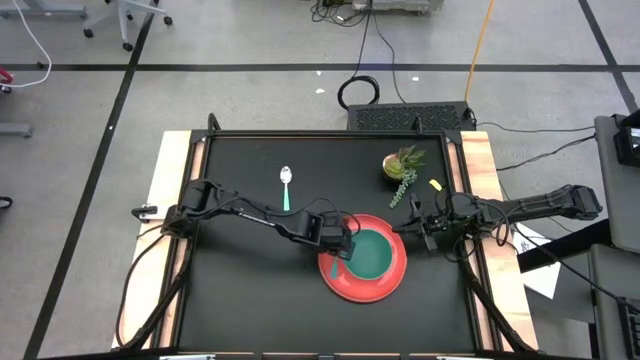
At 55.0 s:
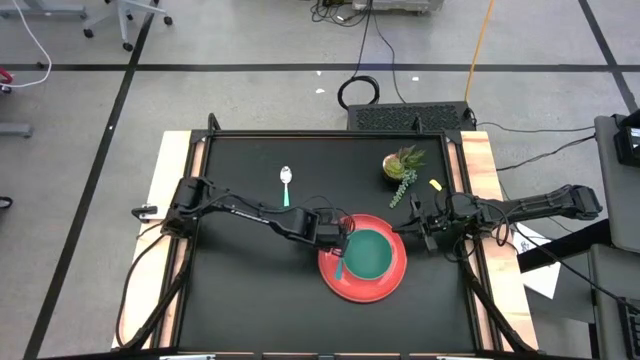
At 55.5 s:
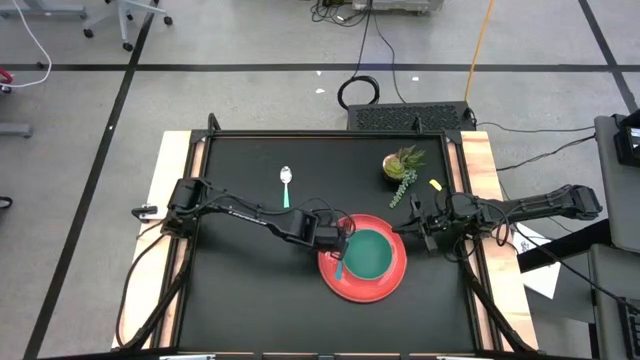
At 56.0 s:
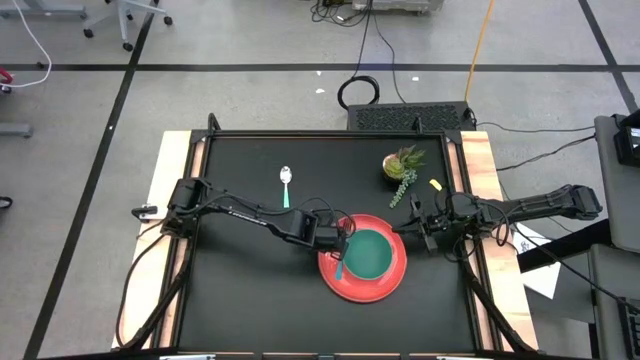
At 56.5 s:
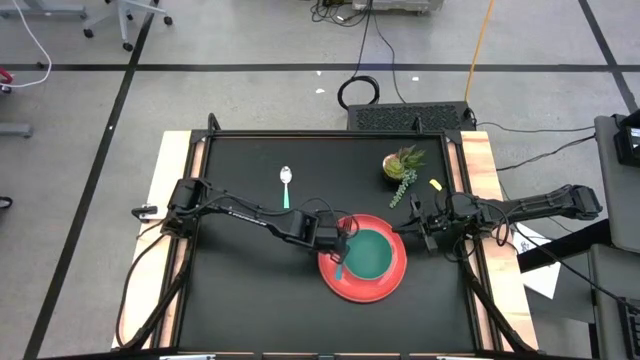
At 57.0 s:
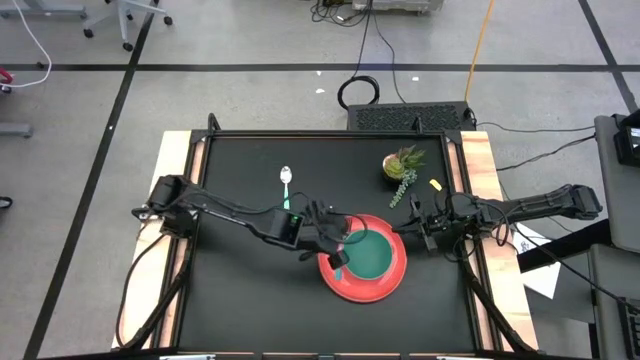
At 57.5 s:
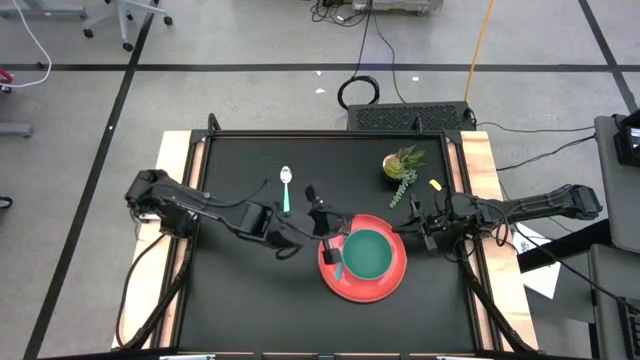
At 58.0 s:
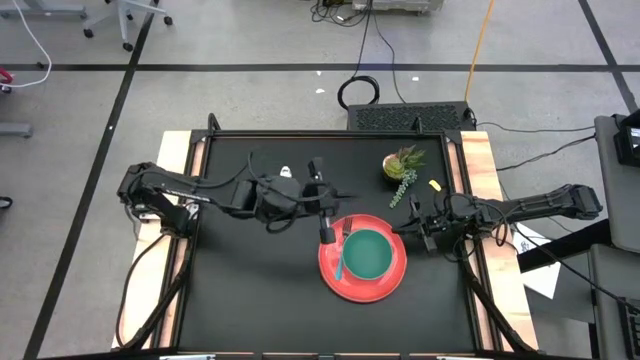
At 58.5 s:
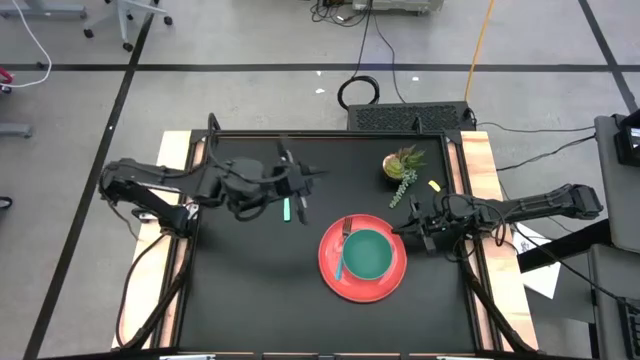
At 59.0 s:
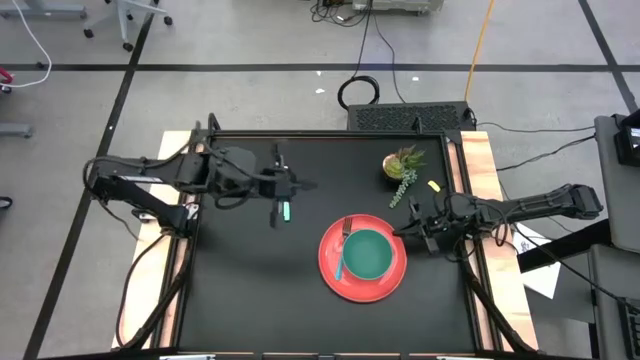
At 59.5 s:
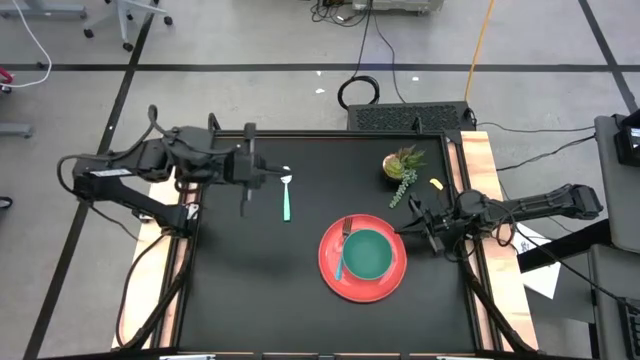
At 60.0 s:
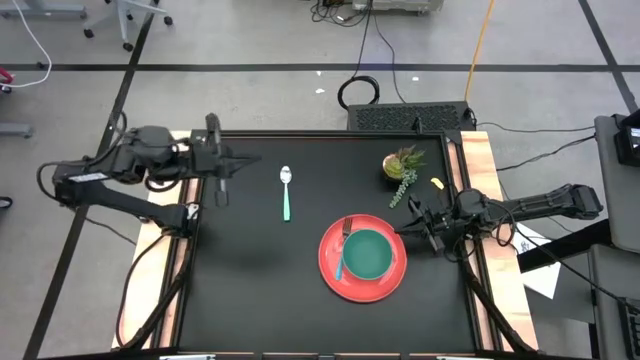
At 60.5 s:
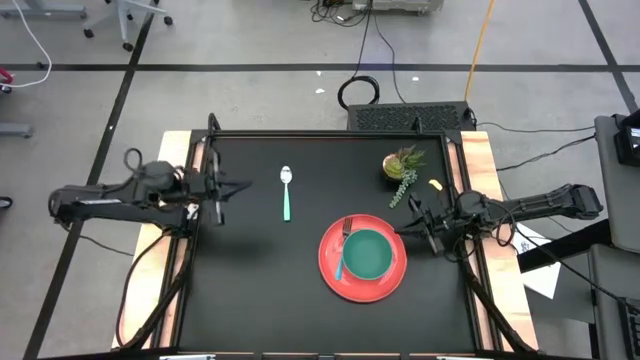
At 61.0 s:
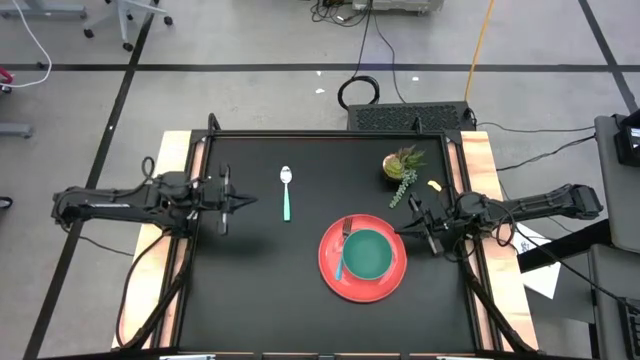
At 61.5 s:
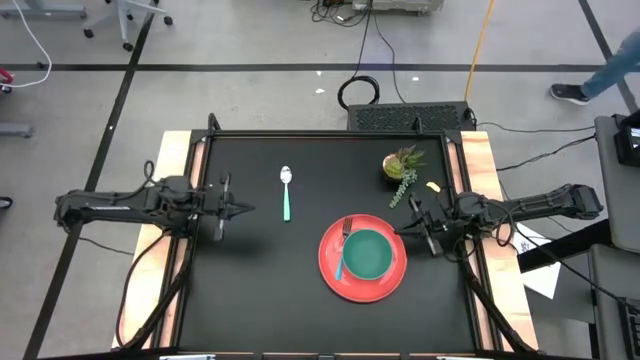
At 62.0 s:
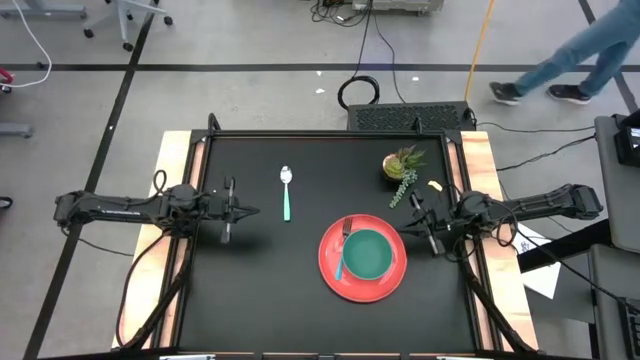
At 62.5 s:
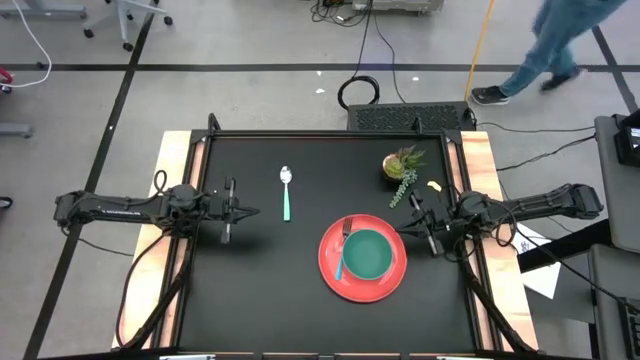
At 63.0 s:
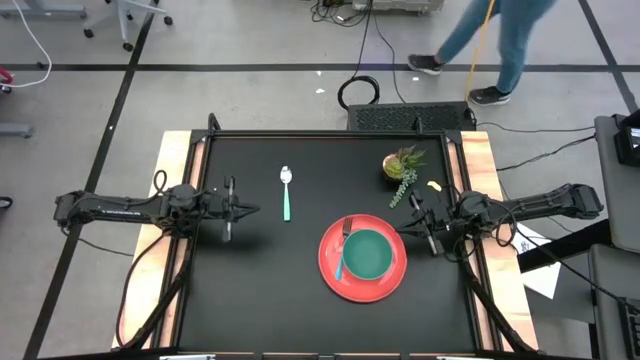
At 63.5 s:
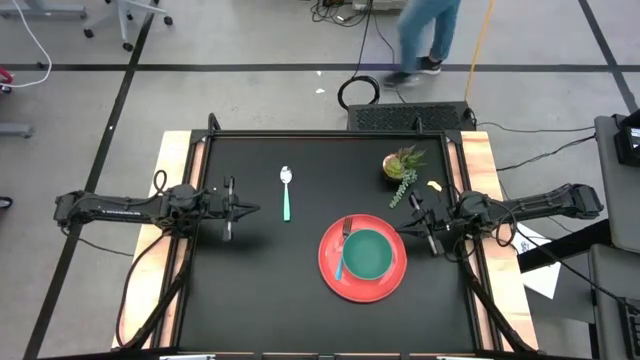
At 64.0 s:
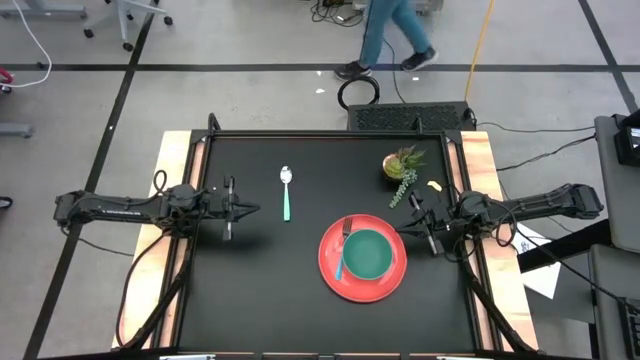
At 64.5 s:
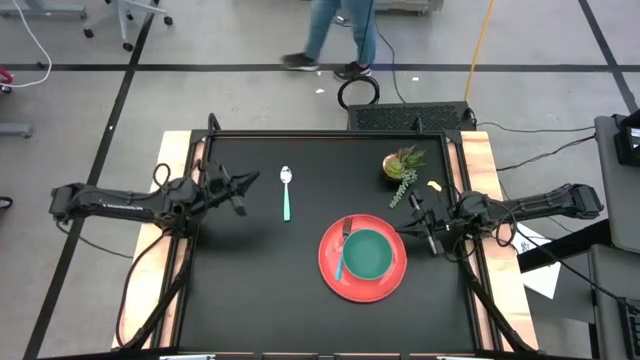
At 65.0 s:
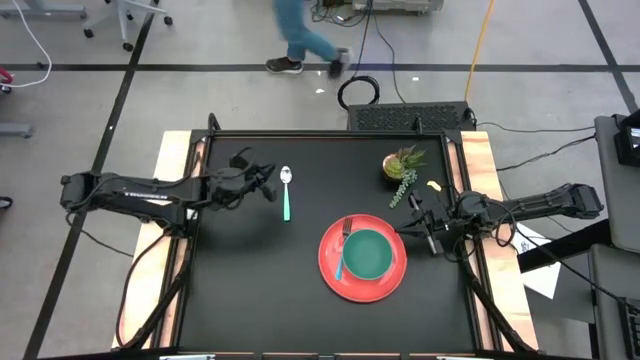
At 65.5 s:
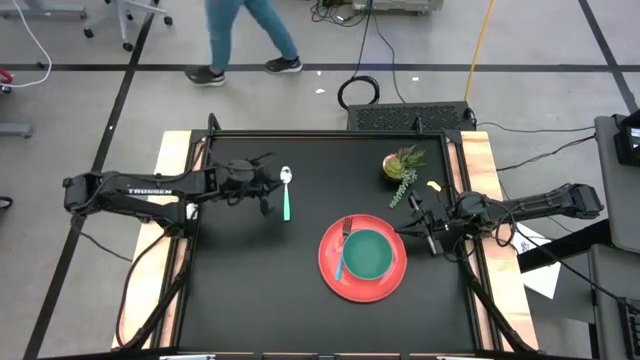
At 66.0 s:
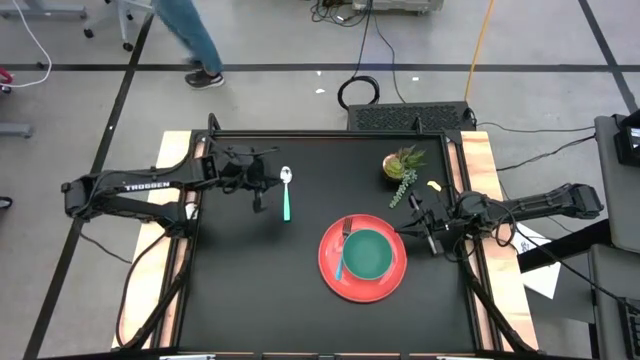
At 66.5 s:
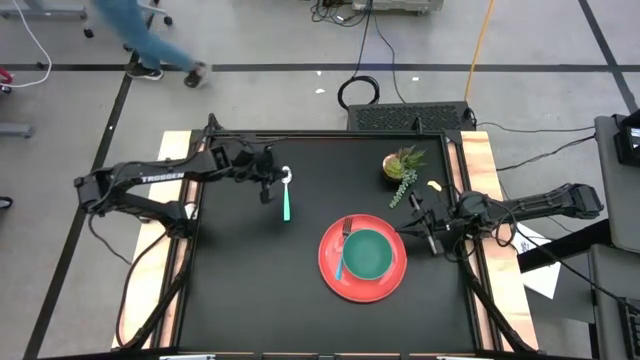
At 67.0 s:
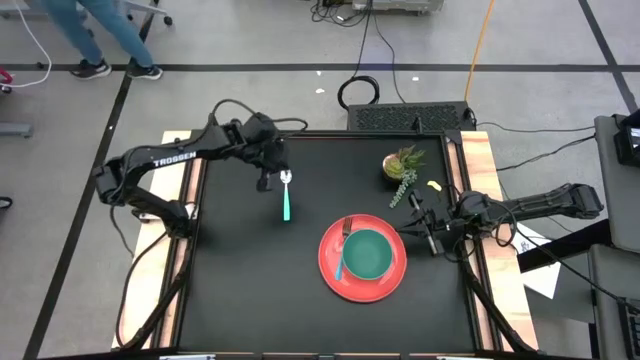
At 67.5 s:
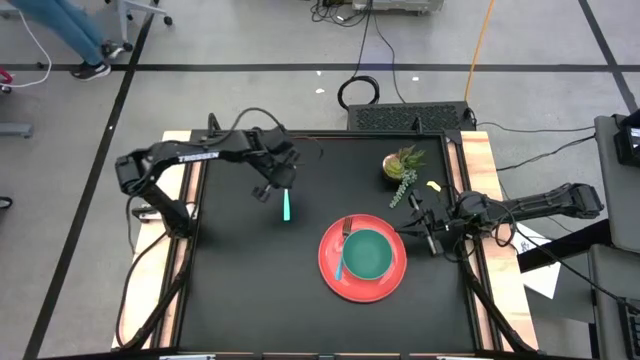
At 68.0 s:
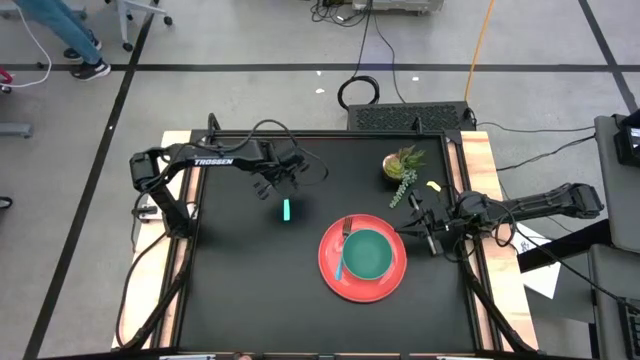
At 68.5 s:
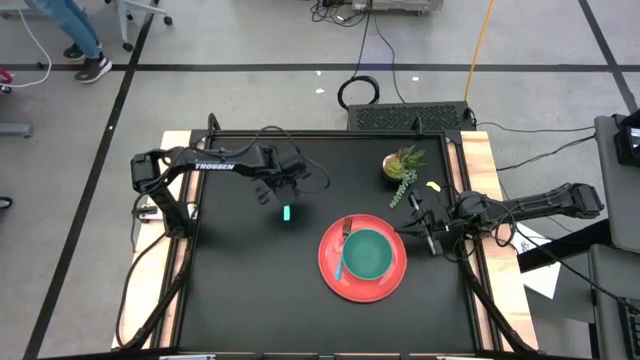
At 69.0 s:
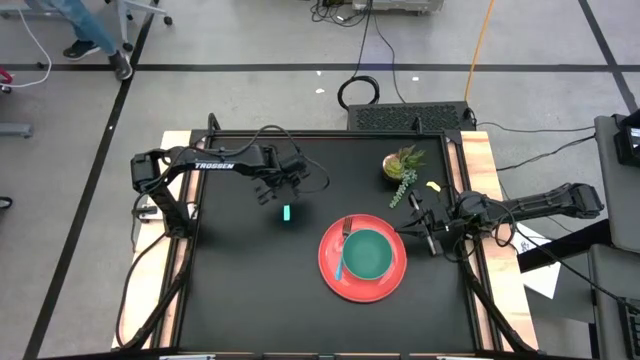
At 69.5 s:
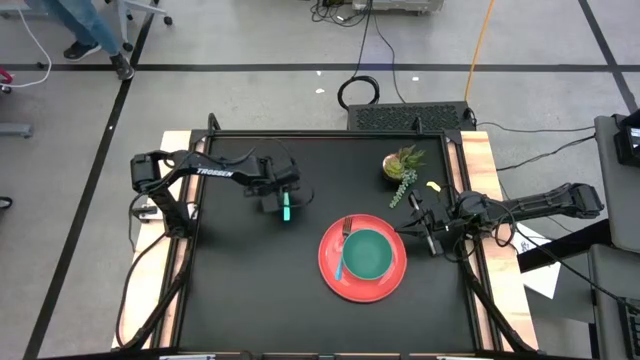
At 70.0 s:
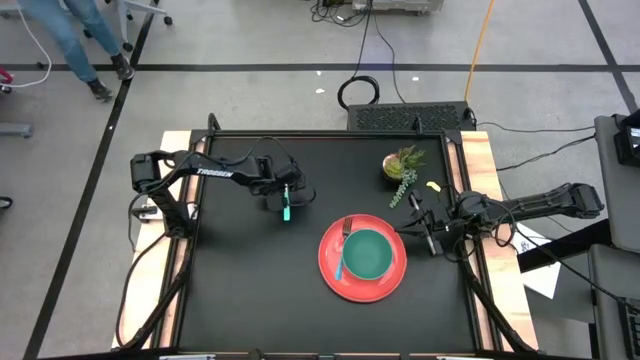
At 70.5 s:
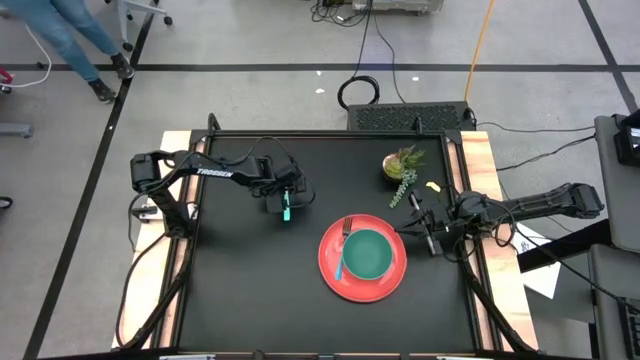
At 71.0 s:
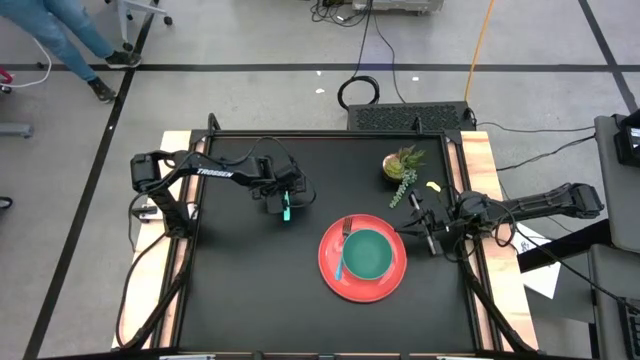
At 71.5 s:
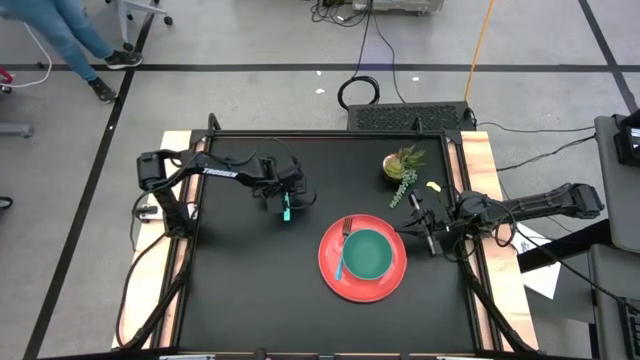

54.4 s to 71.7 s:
Task: Set table place
Put the blue spoon into the green bowl
